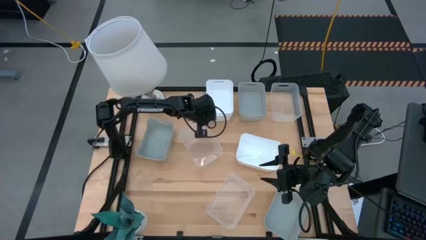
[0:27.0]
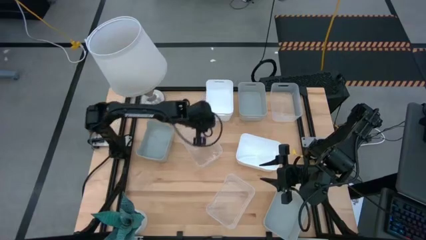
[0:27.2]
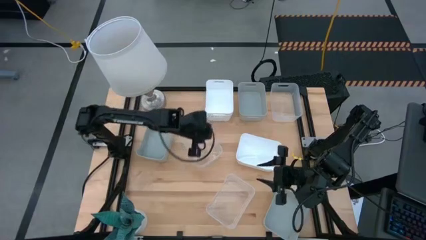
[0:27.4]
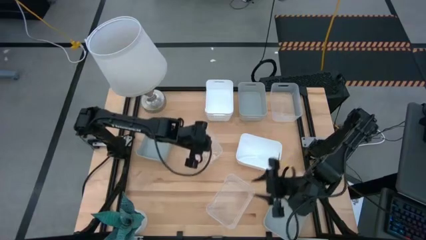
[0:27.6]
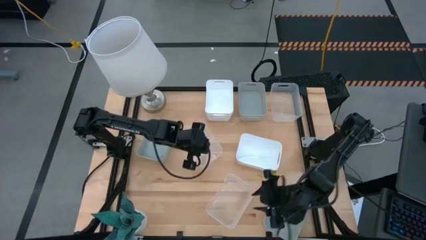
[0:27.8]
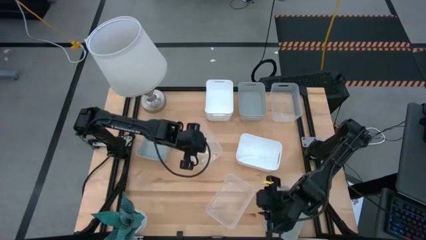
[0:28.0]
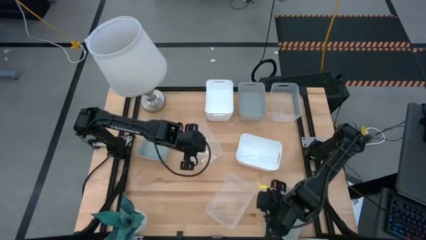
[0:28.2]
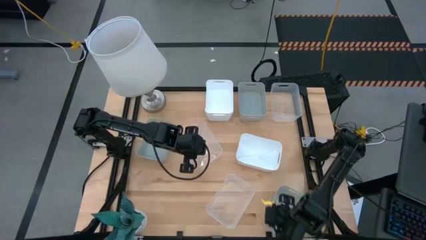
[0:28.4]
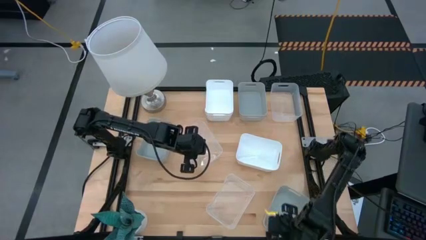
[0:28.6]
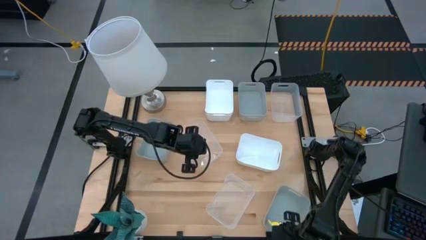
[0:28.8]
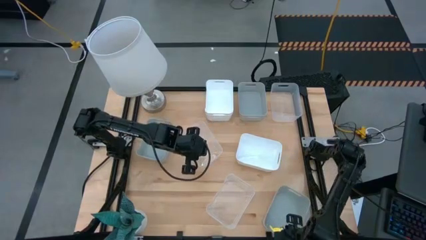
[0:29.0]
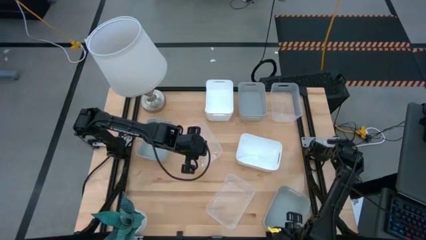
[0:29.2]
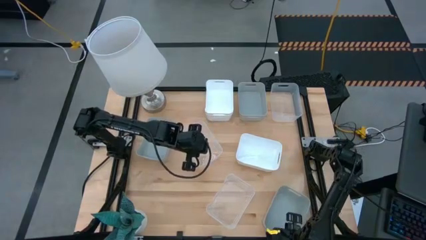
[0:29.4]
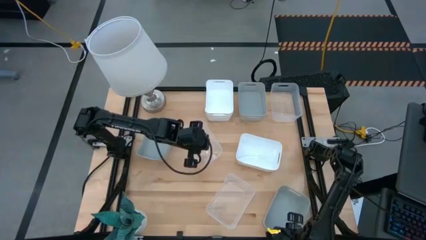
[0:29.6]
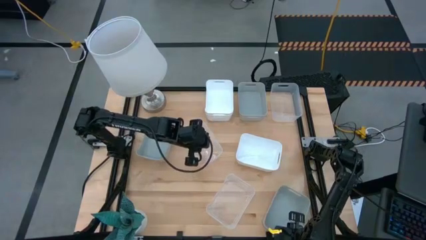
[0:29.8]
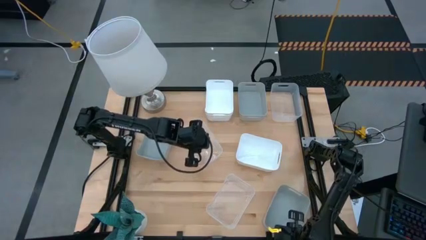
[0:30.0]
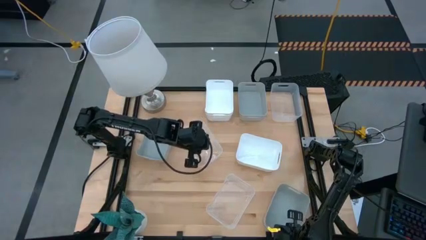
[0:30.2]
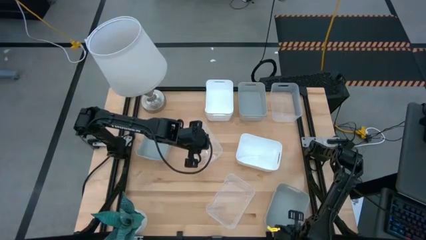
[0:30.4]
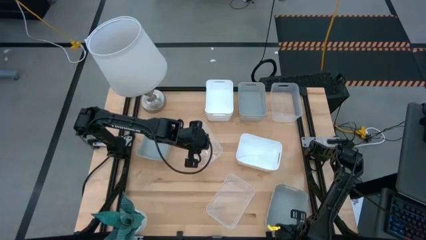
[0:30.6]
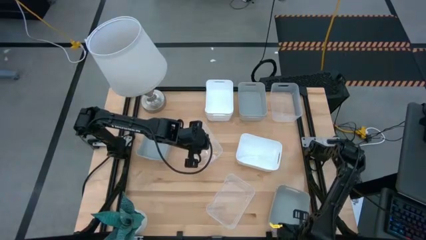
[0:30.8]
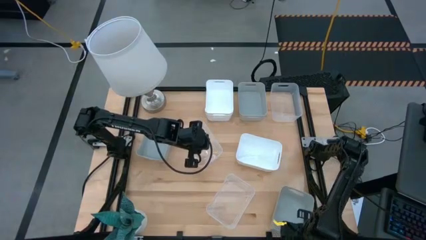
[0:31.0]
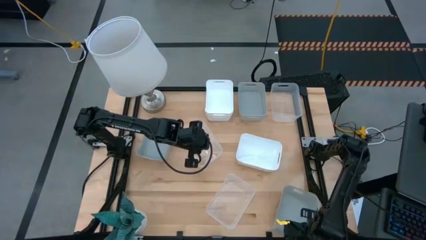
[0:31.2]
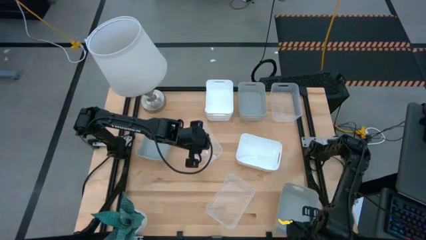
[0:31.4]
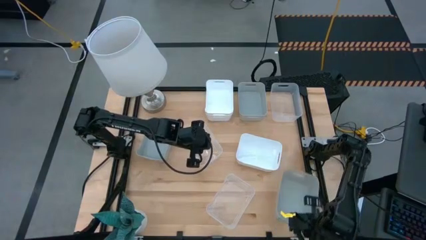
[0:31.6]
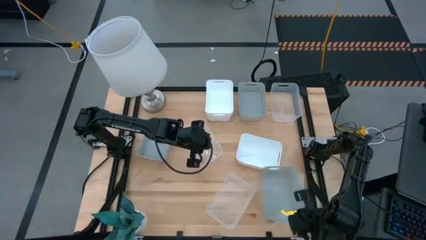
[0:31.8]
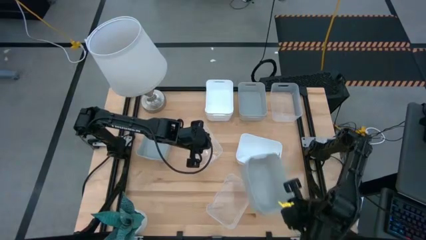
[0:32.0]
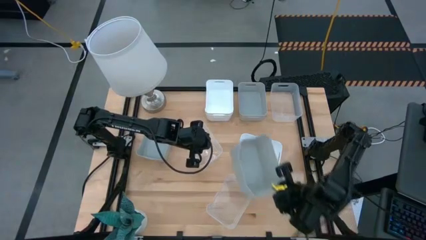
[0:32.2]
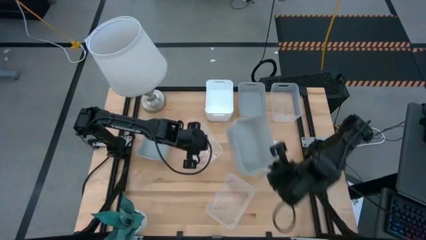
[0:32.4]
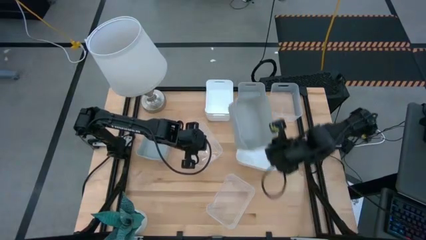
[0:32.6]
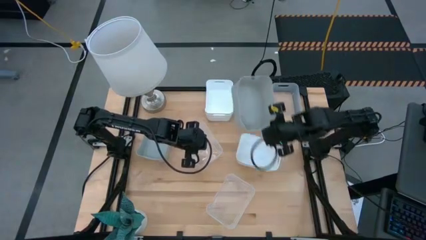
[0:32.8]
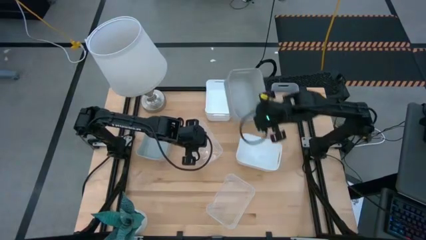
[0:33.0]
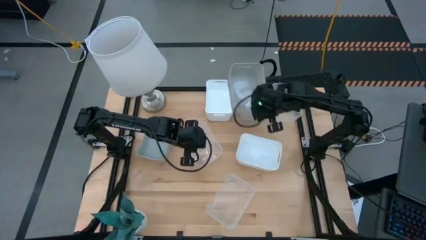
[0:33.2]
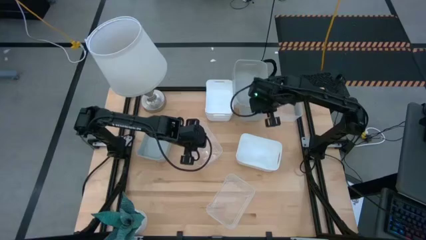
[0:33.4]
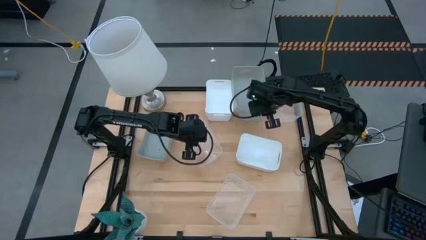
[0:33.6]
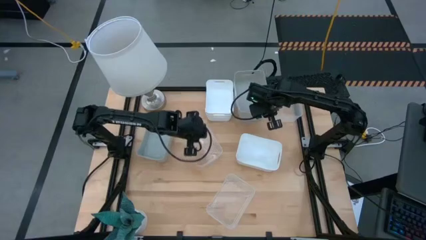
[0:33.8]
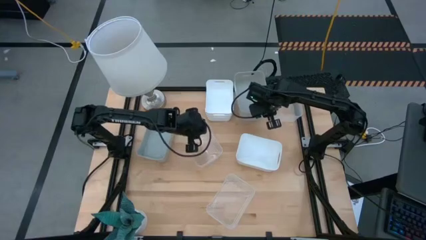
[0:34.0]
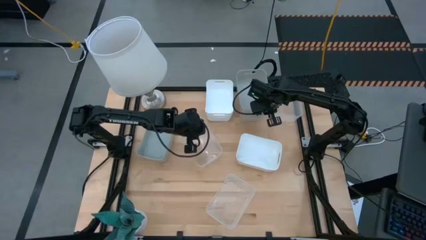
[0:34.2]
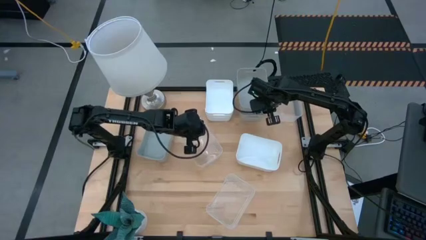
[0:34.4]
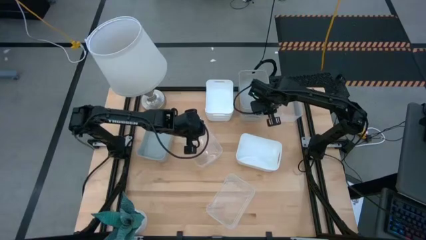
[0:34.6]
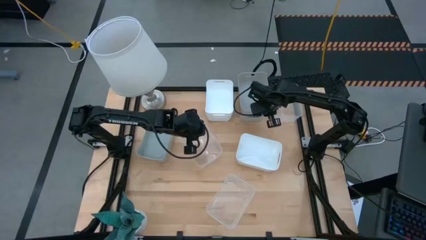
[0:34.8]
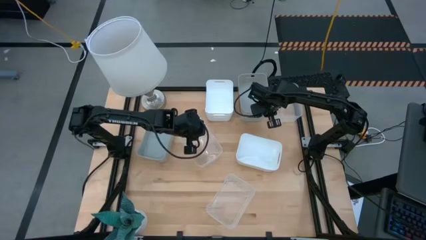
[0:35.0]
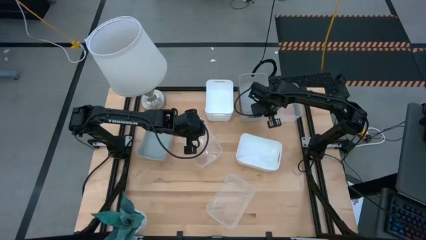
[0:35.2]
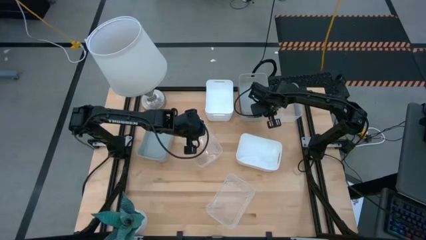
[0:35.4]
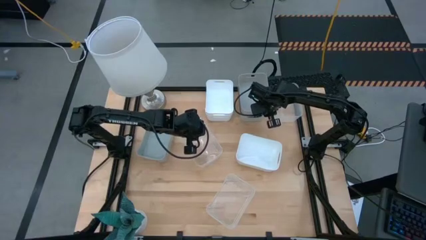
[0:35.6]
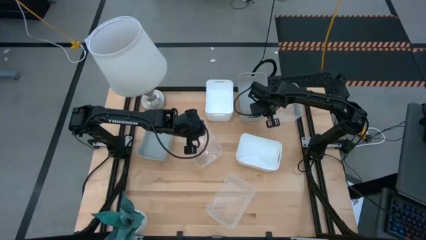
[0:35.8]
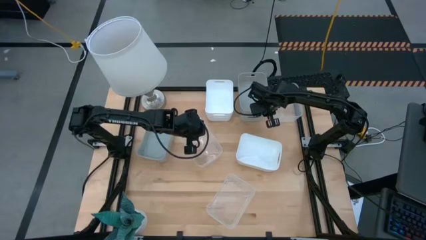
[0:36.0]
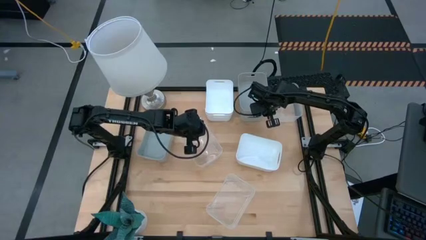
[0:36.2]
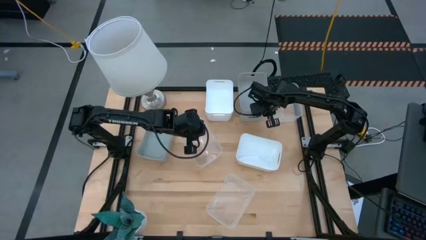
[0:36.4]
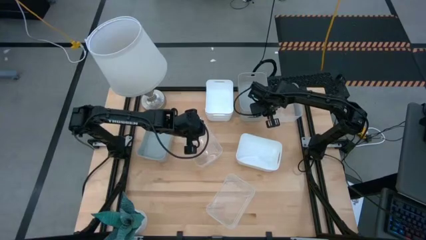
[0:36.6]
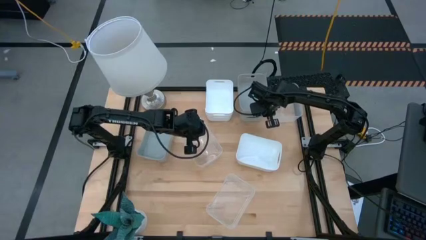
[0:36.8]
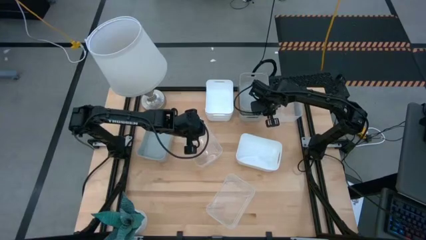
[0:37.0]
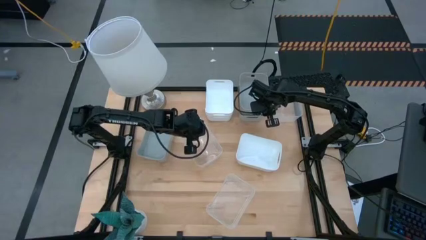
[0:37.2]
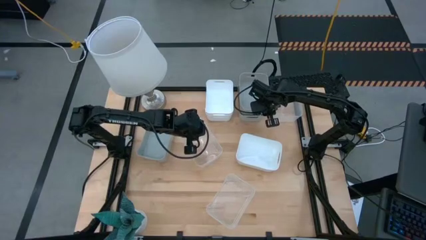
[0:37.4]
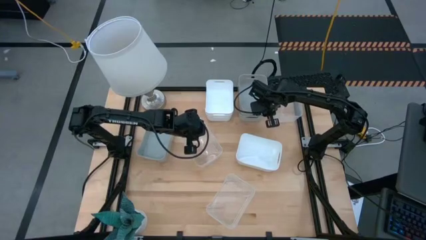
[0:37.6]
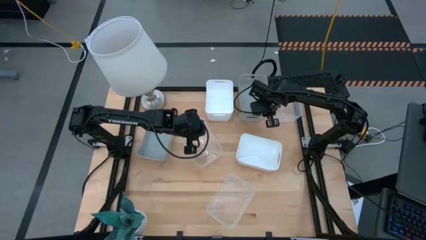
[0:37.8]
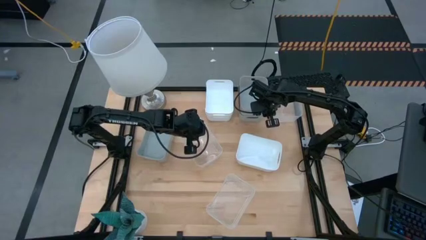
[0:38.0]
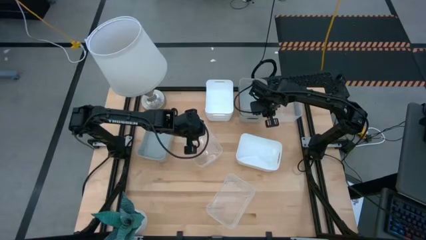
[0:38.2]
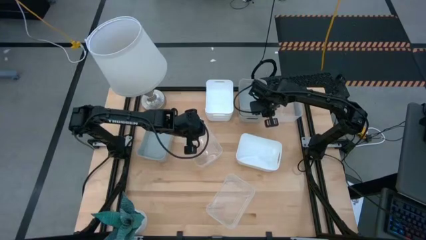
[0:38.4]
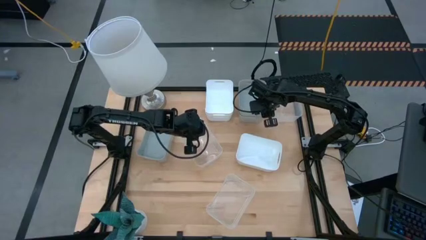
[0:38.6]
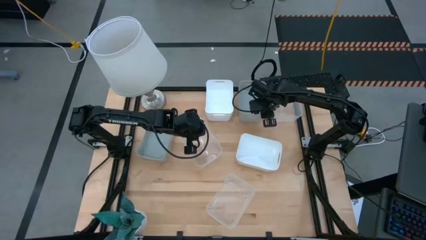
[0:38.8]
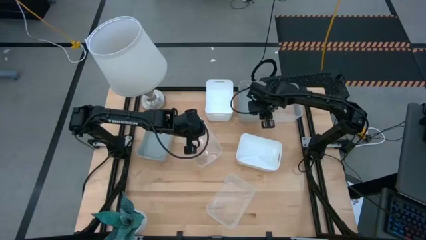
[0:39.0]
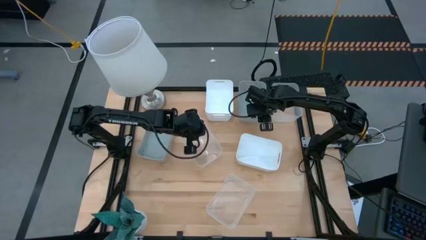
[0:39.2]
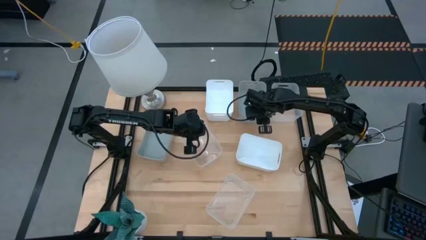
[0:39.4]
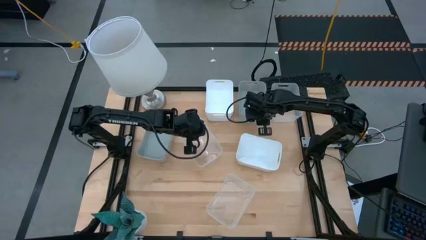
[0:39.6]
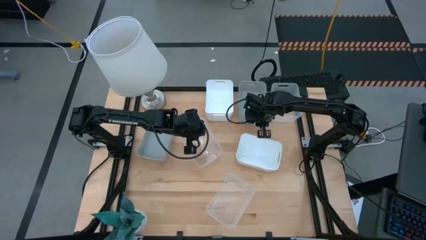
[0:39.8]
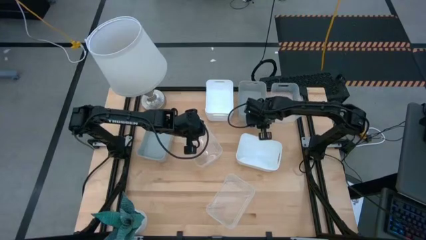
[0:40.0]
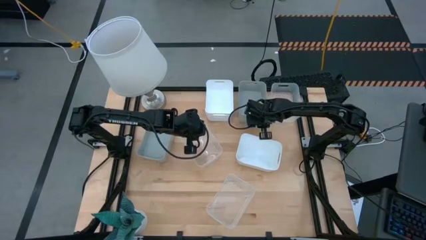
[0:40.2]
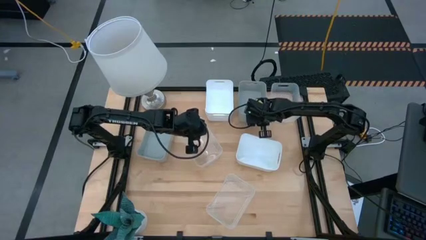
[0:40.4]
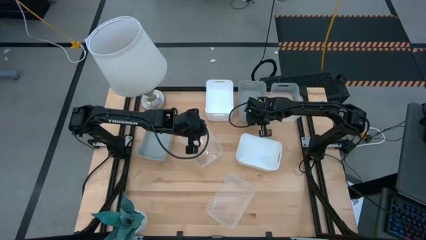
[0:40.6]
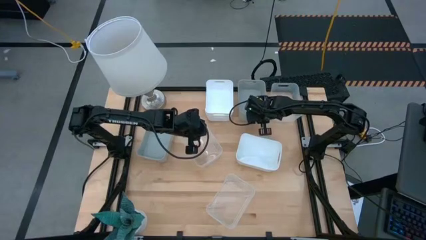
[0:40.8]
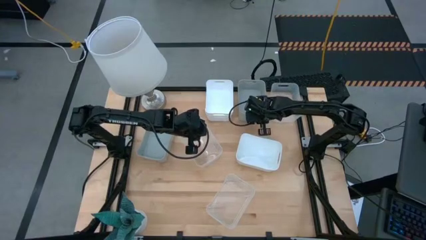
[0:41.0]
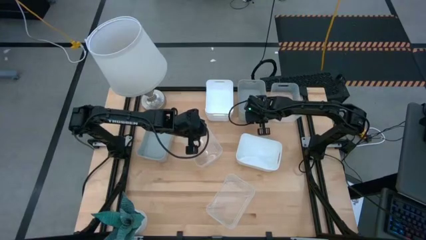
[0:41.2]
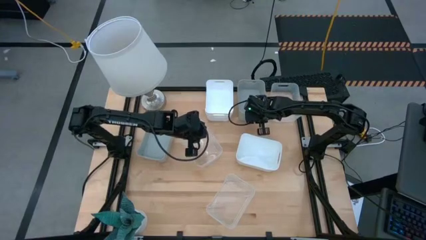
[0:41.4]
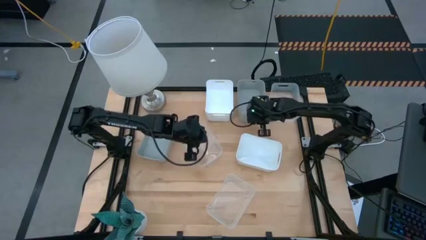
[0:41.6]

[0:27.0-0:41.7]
Stack the bottom gray bin on top of the top gray bin
